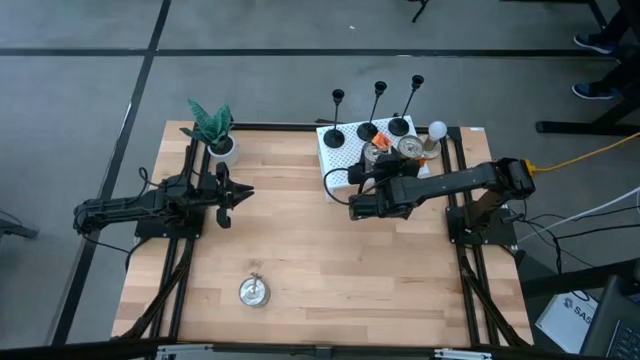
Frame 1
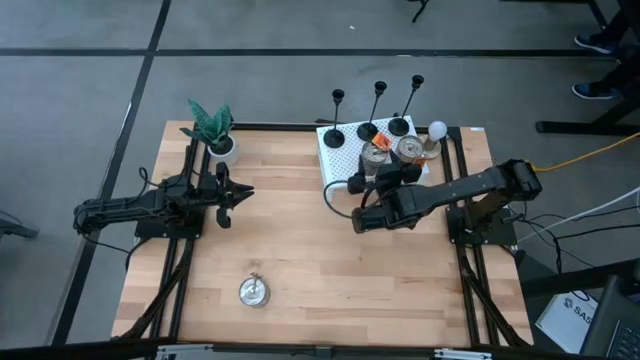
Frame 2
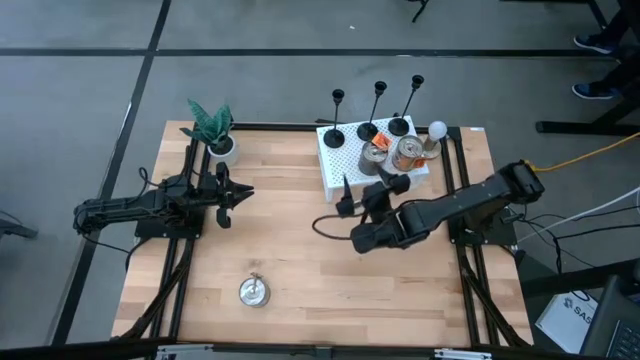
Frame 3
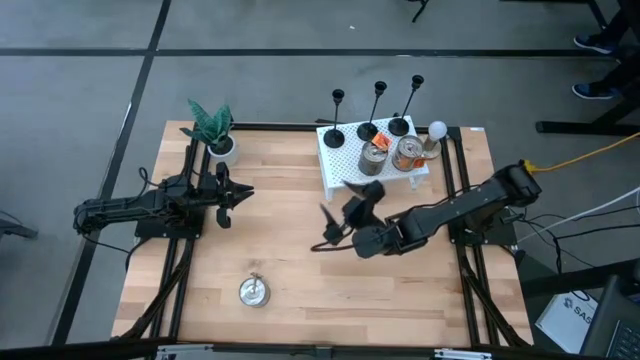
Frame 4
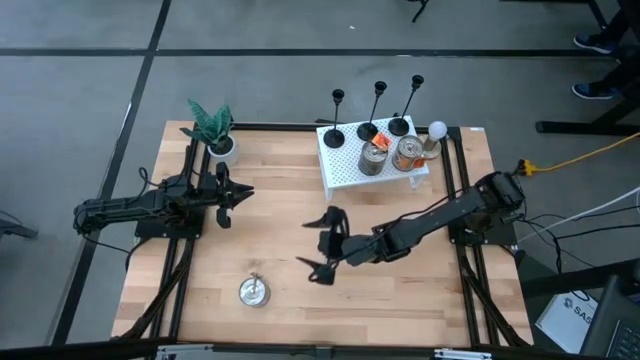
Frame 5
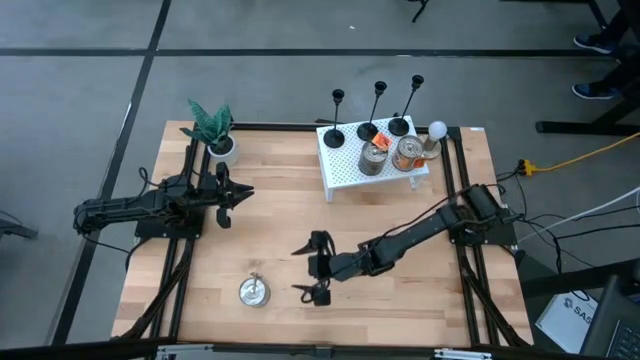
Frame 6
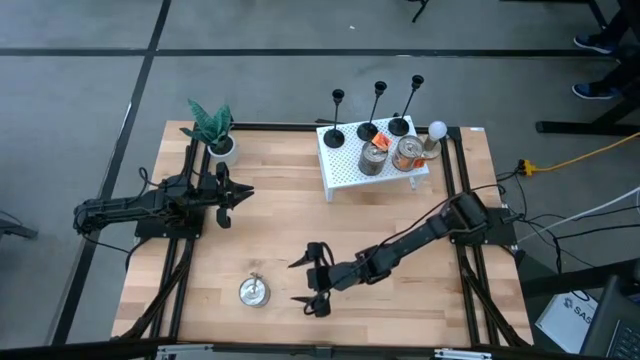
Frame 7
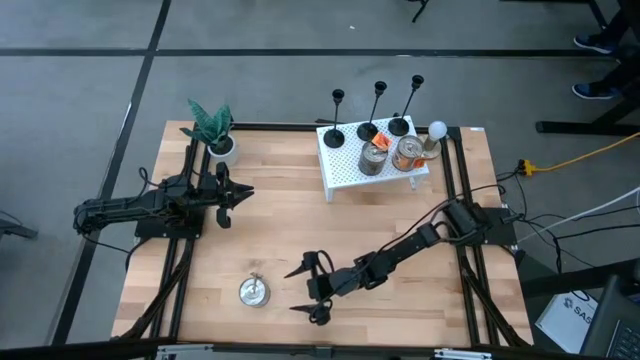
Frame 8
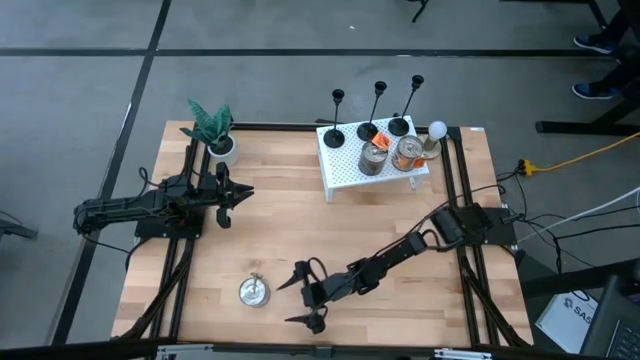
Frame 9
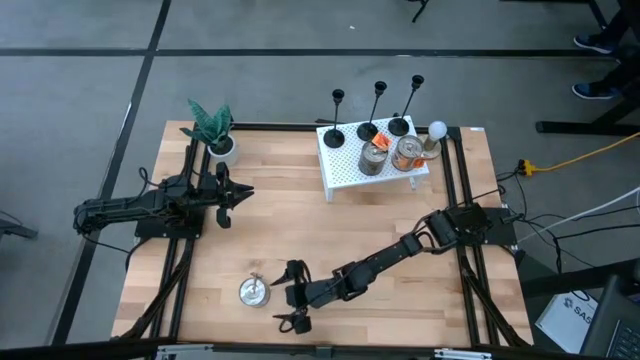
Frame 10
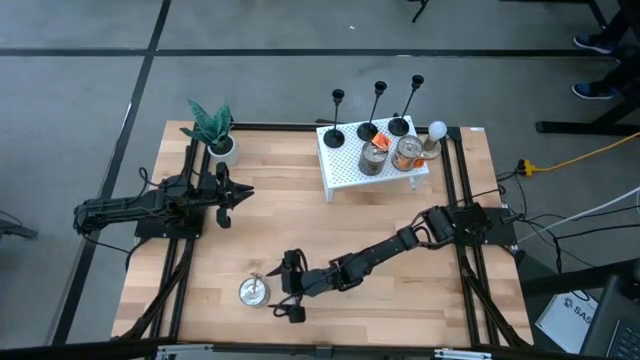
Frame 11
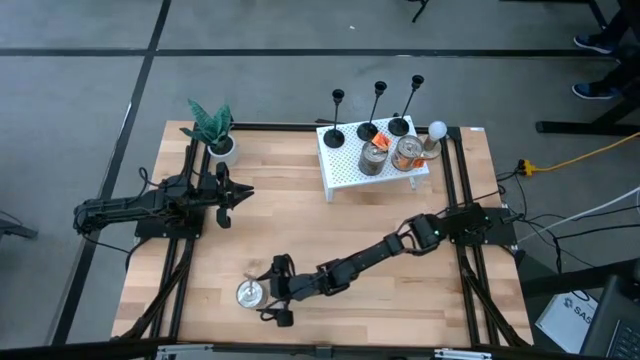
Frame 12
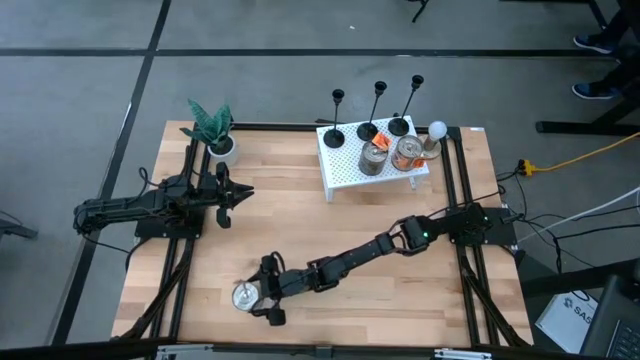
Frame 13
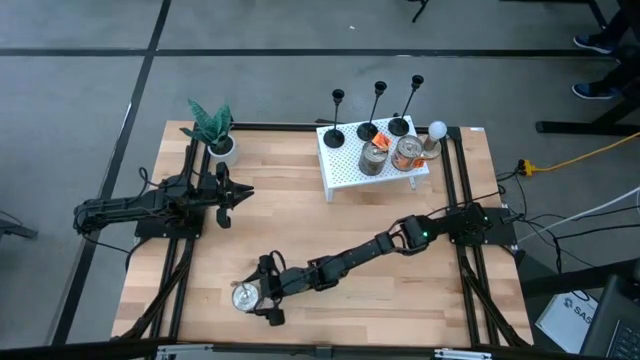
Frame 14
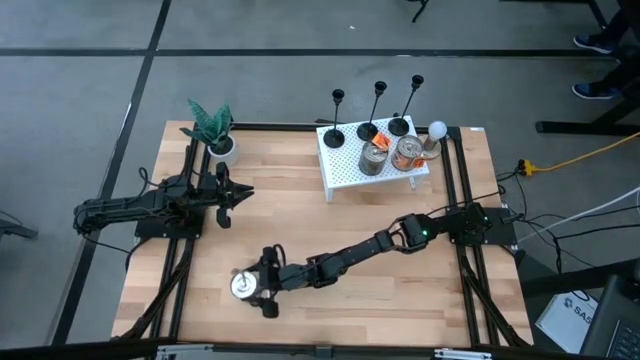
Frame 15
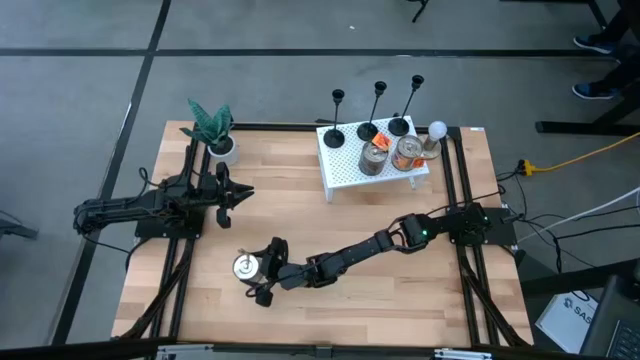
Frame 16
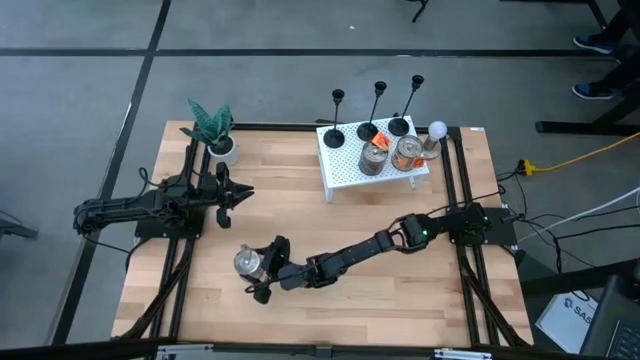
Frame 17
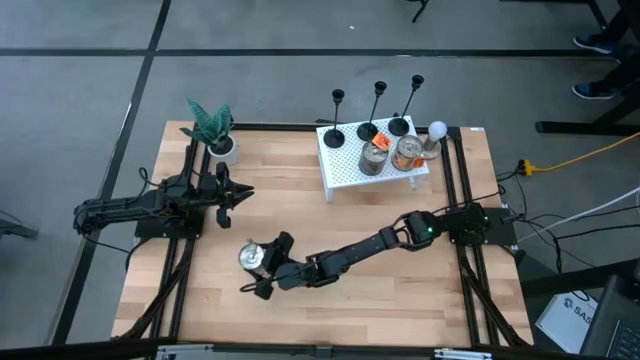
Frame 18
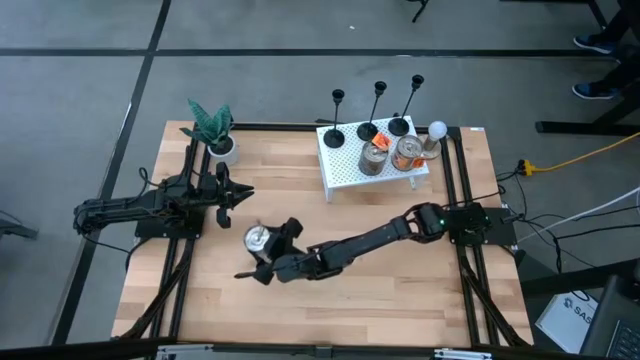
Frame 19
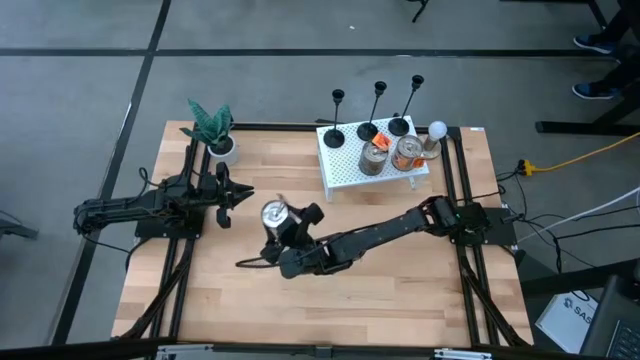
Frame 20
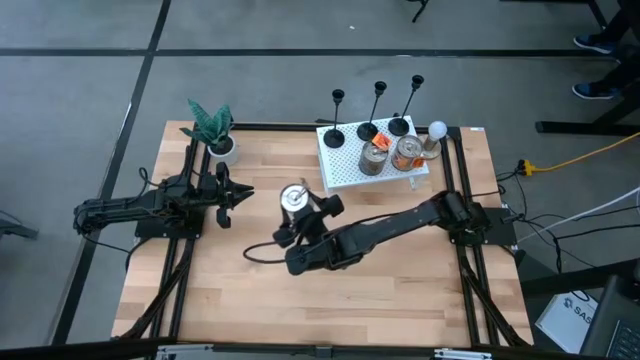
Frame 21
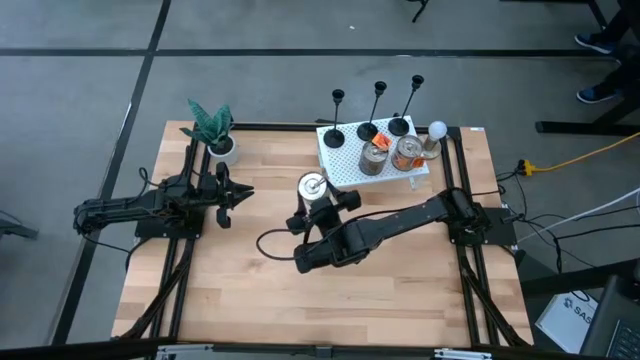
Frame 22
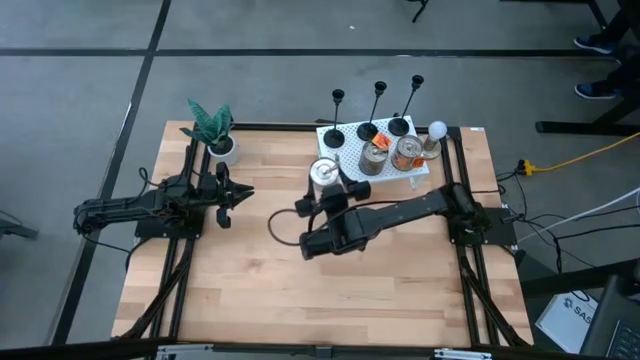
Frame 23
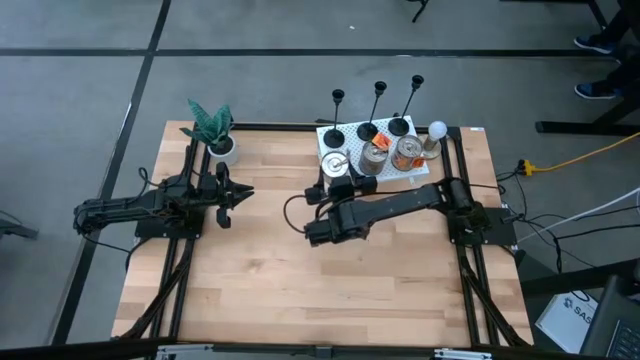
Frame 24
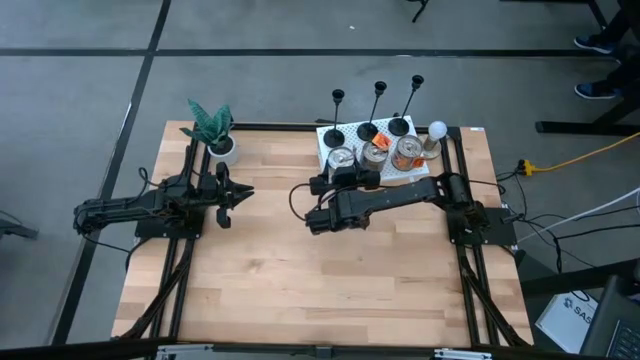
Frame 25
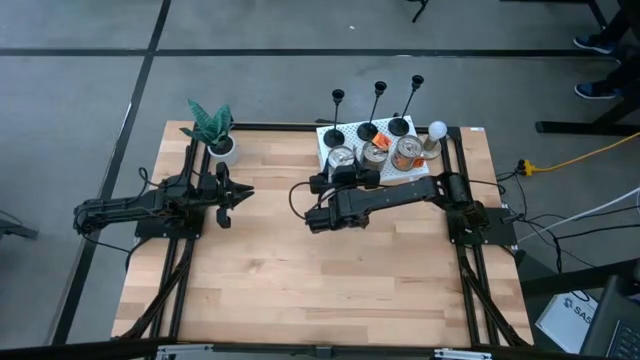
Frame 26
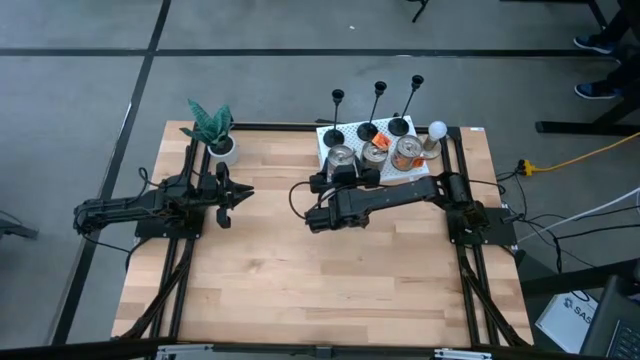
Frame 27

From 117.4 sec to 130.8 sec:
Task: Pick & Place candle stick holders
Put the brown scented candle on the shelf

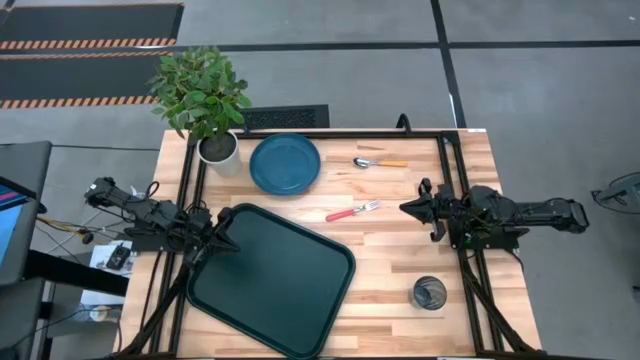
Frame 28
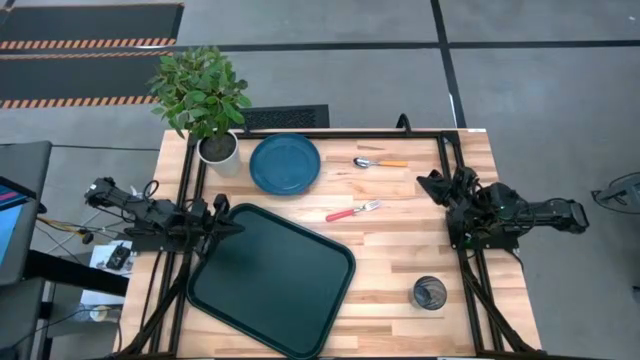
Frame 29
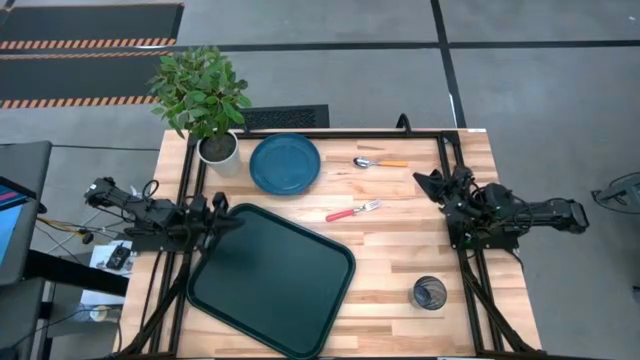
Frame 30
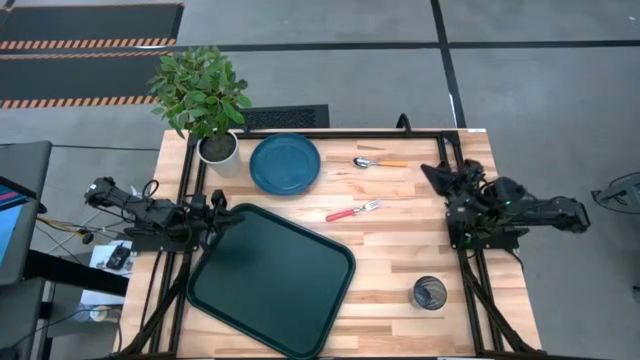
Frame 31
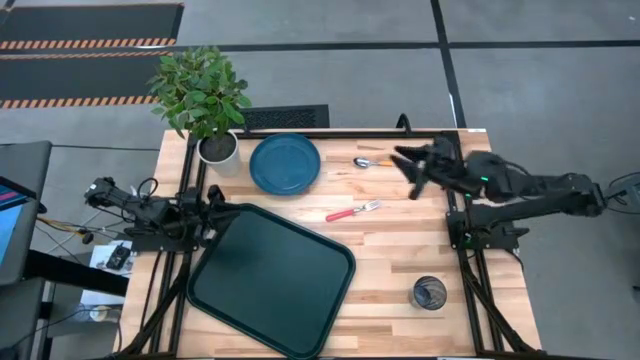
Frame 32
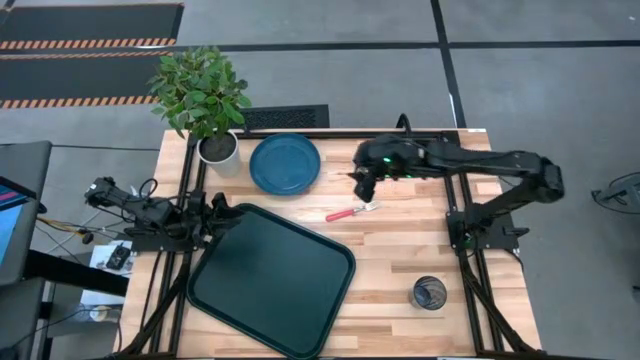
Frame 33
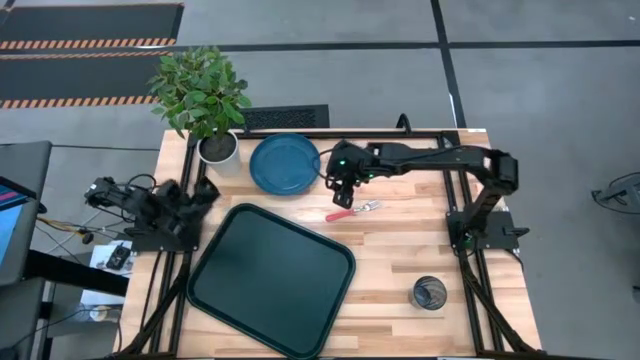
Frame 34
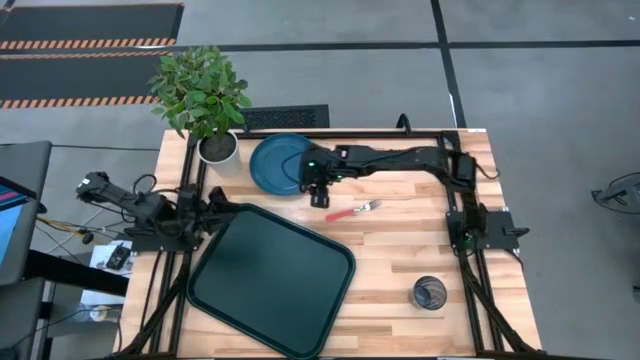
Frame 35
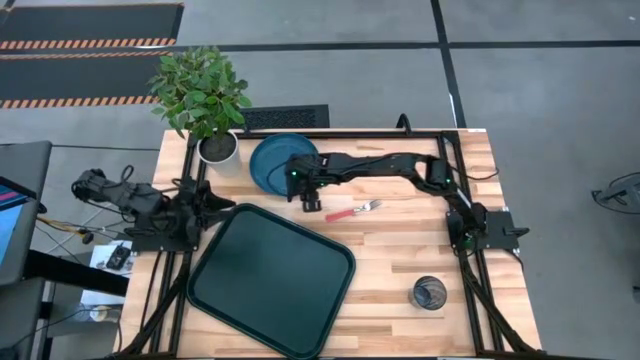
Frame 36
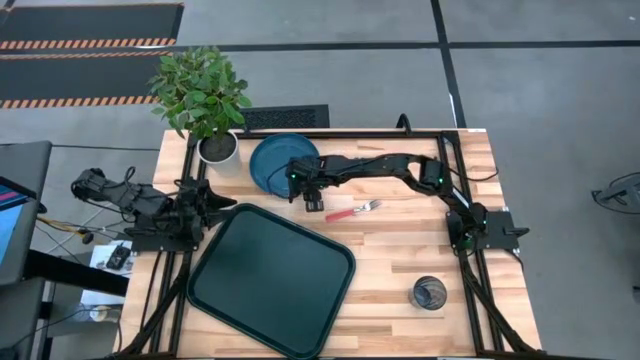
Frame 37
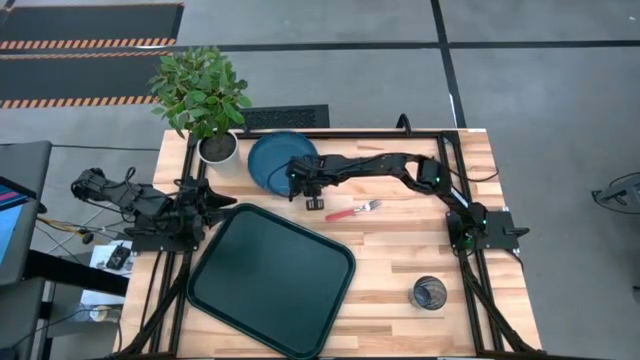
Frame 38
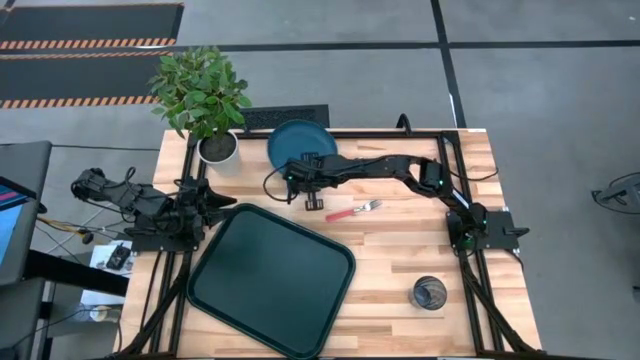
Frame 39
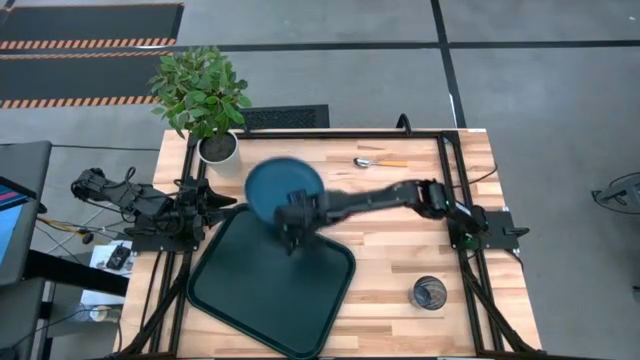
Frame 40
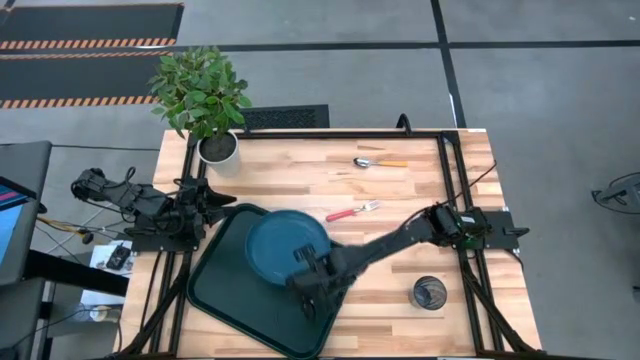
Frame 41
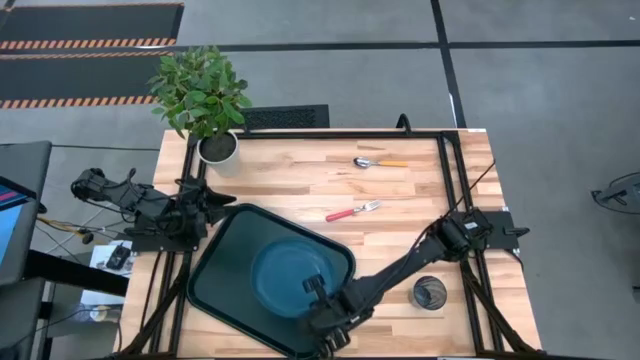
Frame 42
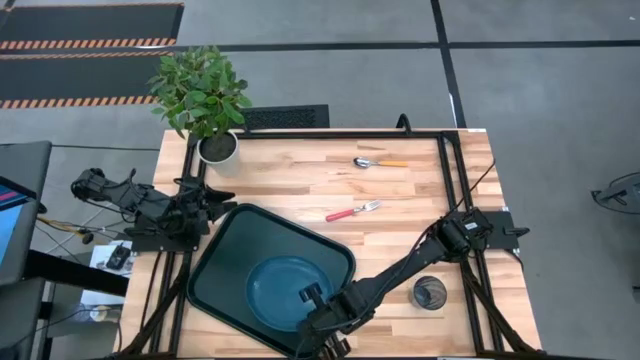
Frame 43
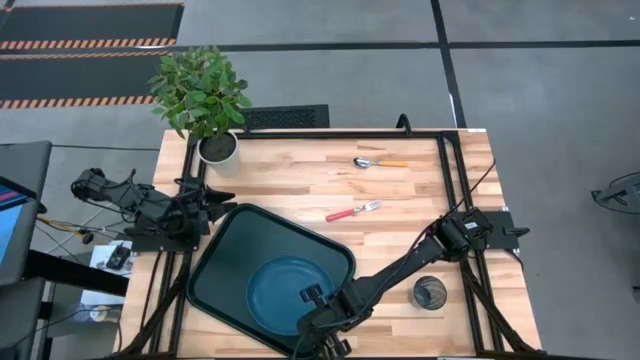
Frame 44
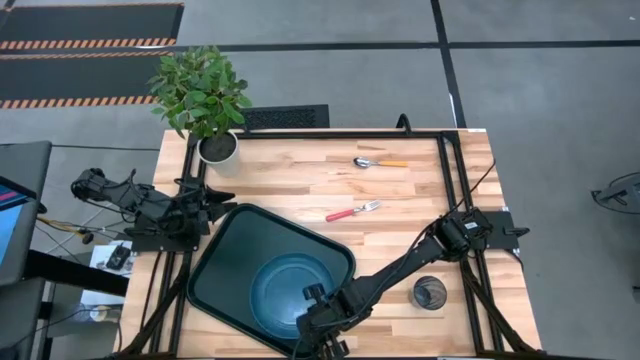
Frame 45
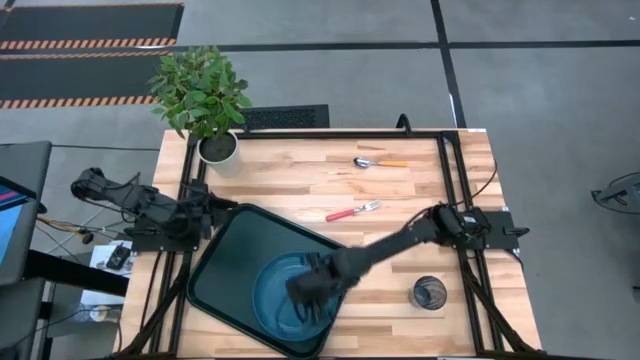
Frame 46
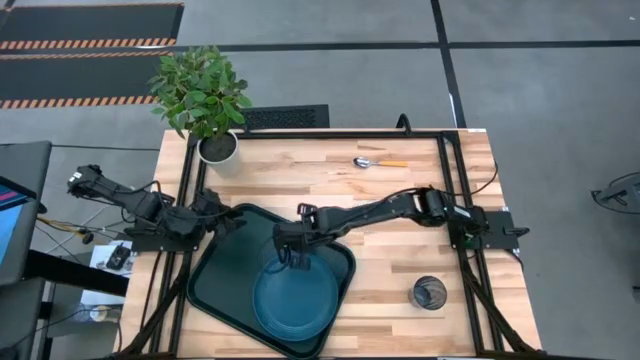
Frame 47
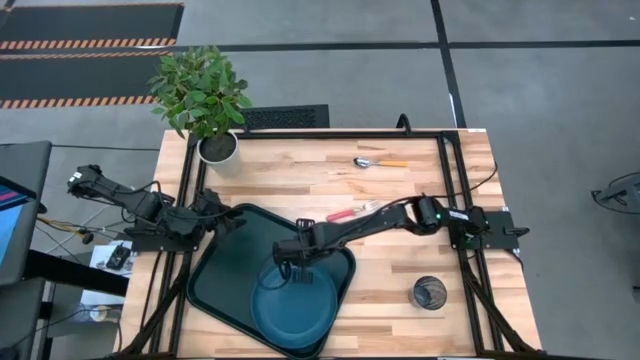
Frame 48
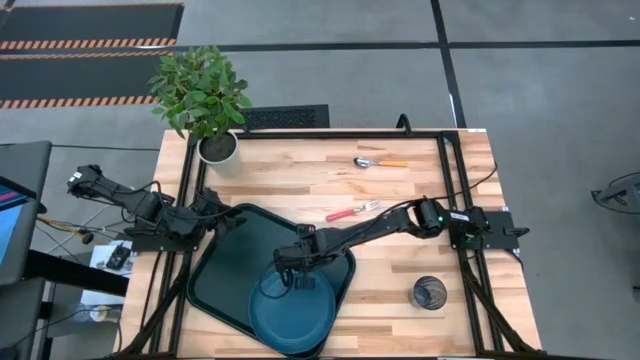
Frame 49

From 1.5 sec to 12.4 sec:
Task: Pick and place plate/cup/fork/spoon on tray
Put the dark blue plate on the bottom right of the black serving tray
